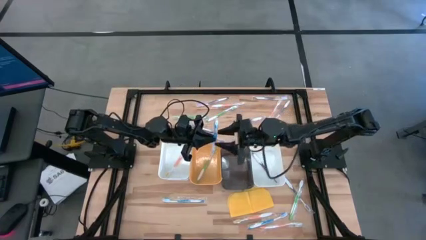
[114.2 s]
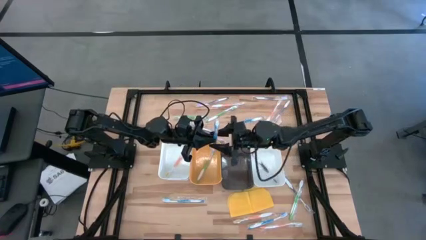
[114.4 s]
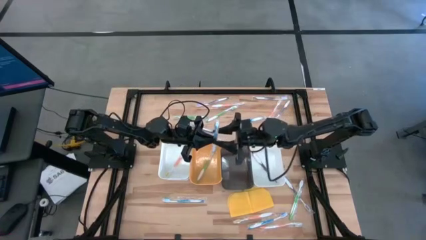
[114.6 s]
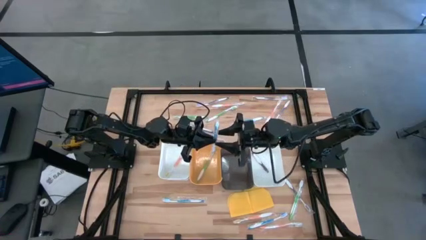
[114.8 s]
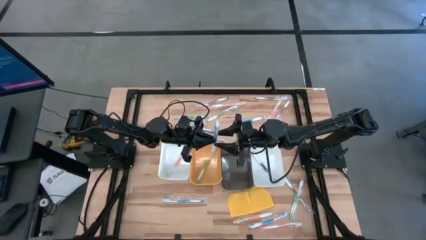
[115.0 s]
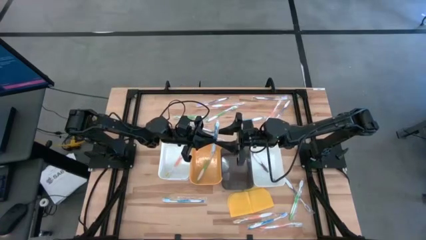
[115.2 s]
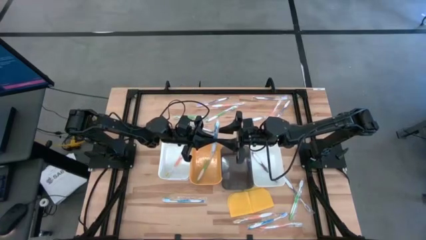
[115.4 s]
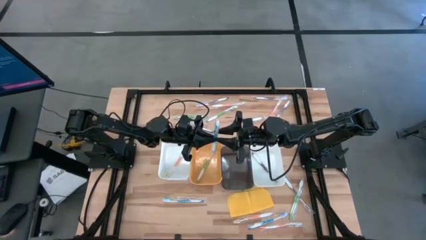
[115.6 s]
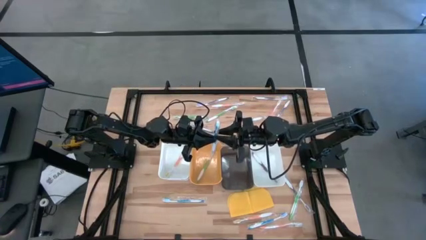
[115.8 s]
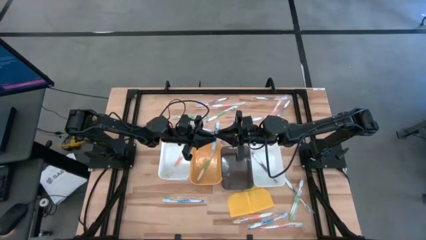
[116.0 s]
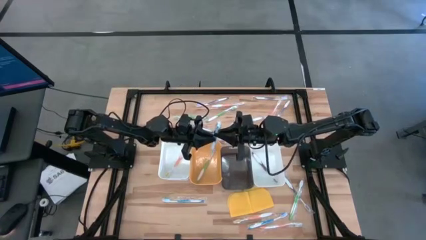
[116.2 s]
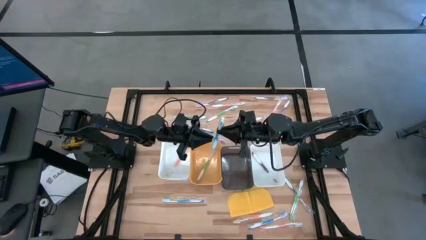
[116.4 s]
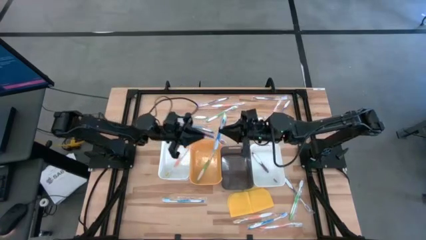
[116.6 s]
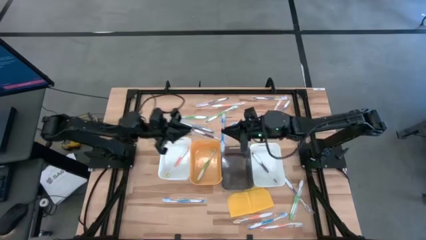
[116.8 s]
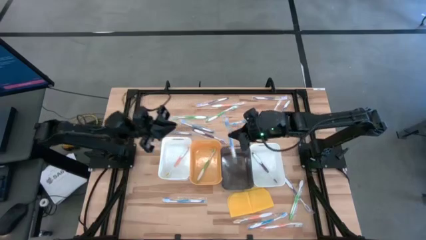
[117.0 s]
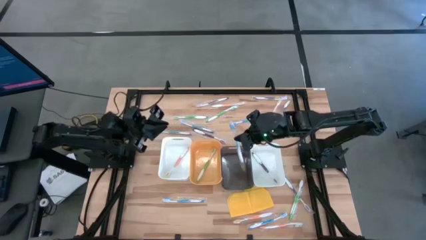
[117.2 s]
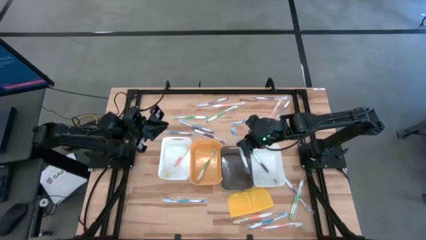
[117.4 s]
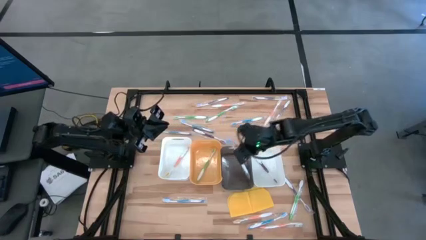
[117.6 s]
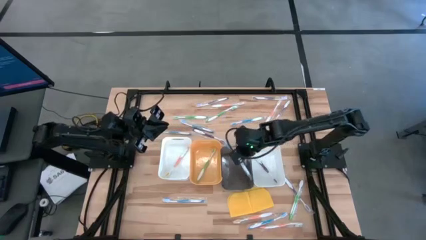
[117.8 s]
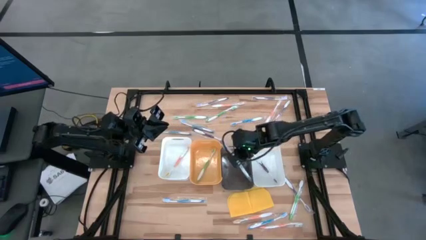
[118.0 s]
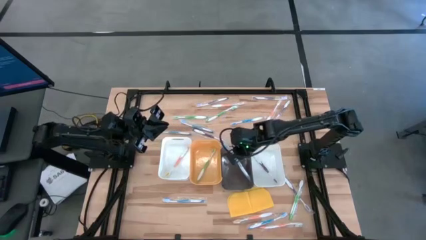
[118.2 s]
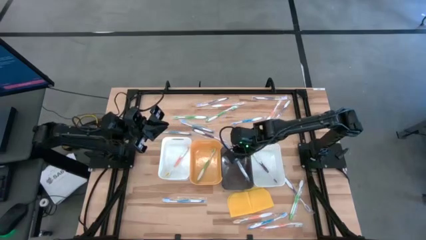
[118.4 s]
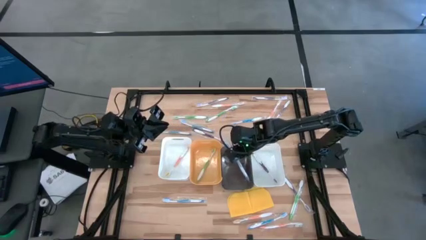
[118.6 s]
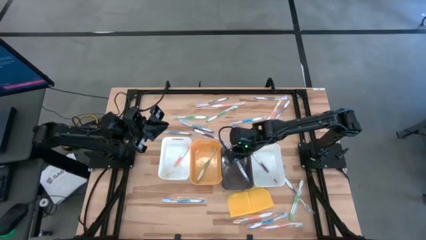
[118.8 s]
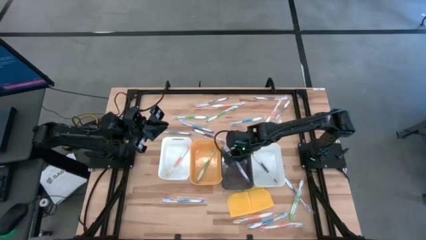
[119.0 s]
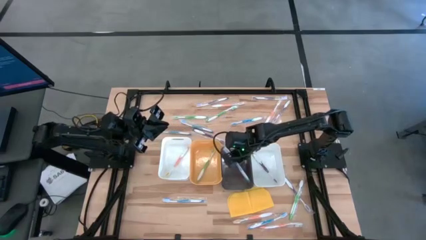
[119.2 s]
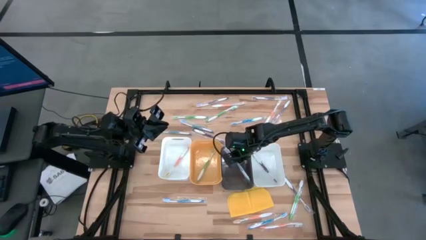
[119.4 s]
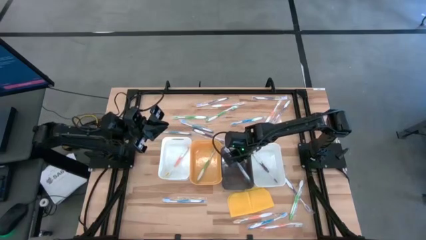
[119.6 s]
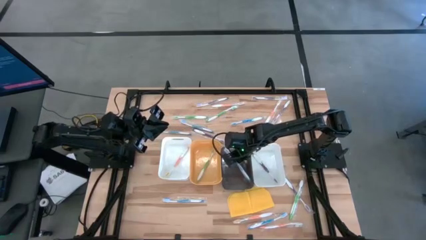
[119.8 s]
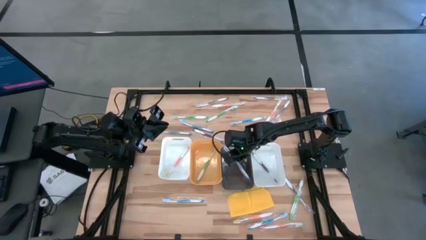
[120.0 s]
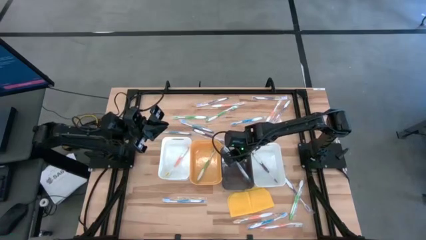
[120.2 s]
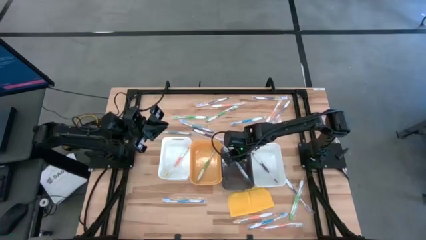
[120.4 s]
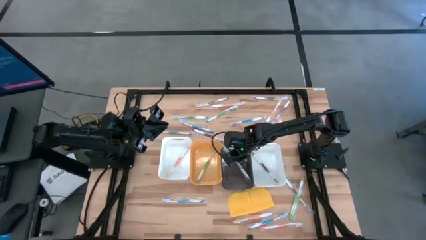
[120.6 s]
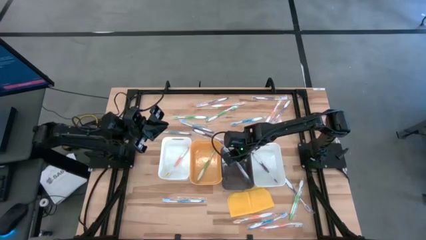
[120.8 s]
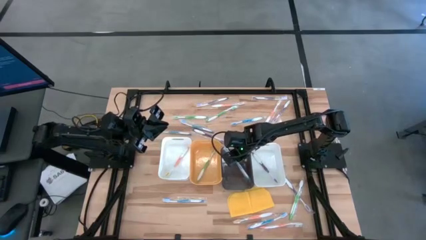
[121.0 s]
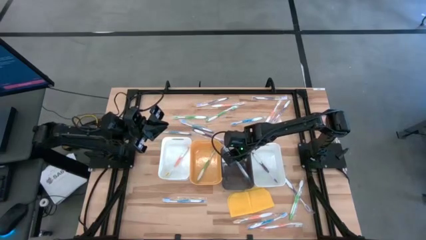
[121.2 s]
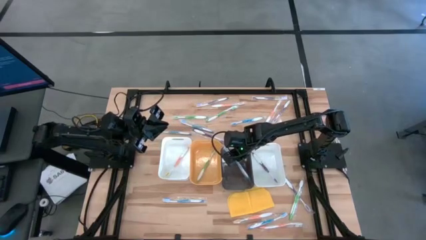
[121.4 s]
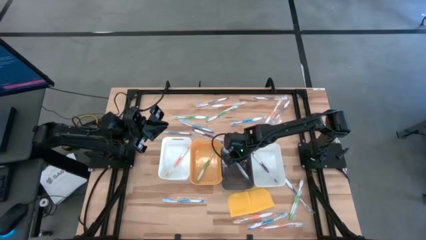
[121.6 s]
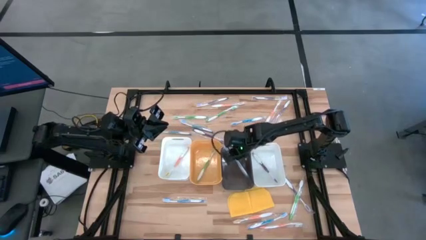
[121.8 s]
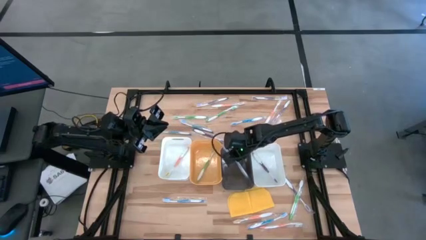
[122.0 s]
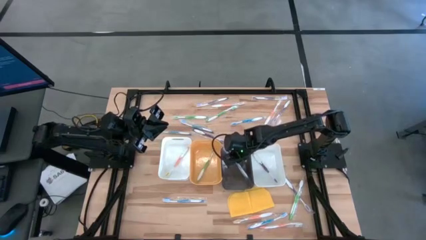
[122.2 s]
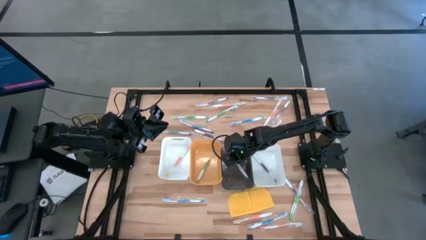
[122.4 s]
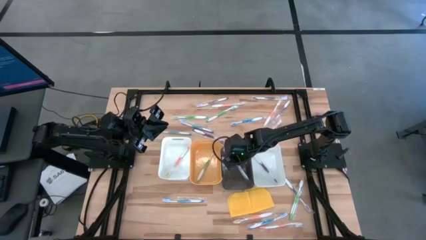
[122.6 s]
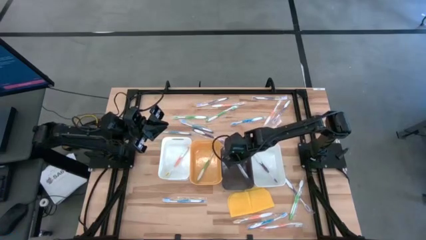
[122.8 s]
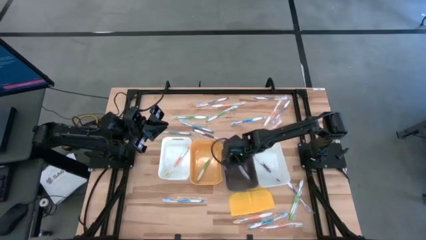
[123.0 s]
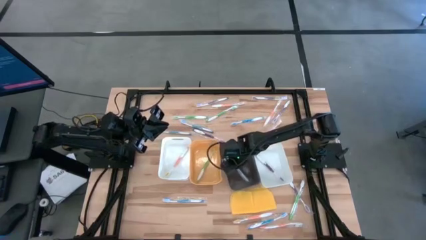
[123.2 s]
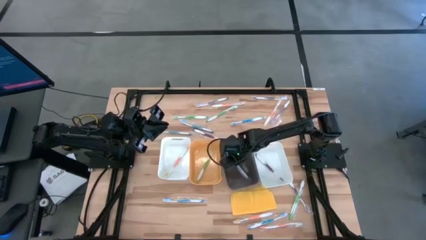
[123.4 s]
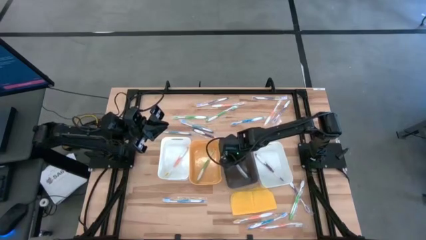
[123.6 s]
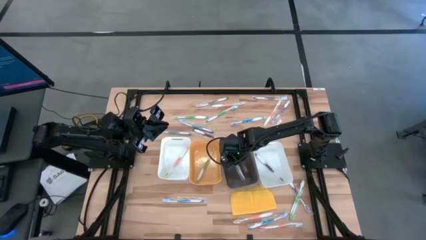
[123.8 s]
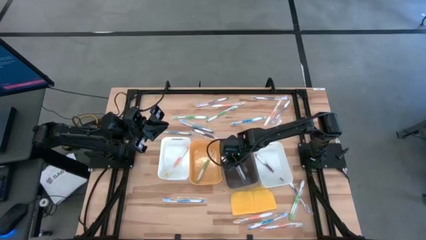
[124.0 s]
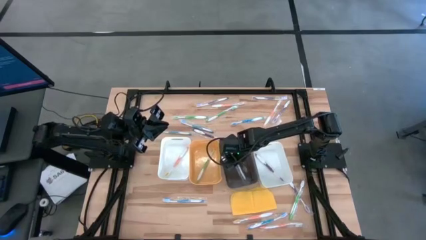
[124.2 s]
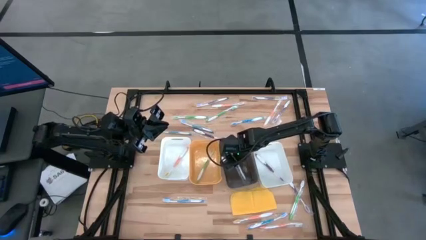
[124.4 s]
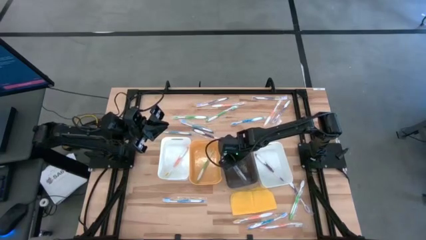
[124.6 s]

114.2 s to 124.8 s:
Task: Pick & Place Toothbrushes
Put the blue toothbrush into the black bin

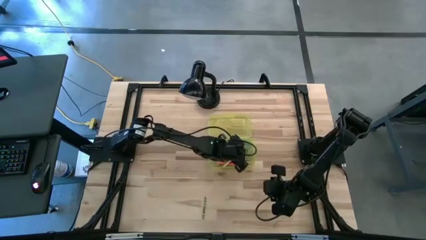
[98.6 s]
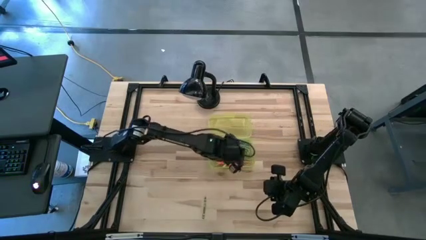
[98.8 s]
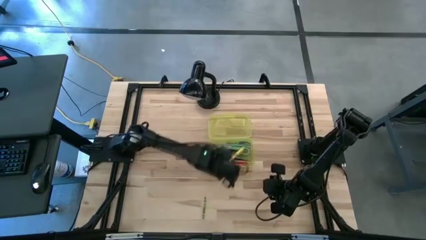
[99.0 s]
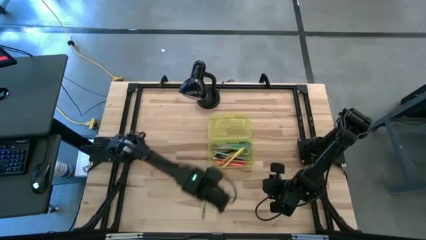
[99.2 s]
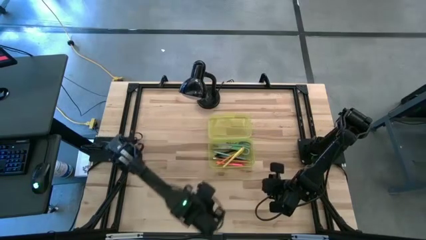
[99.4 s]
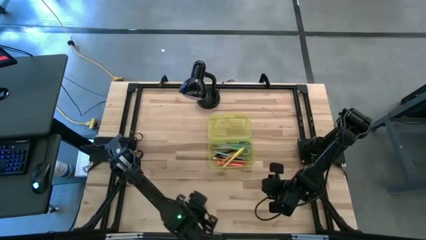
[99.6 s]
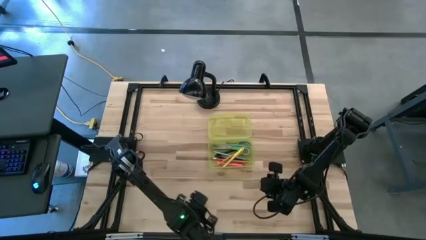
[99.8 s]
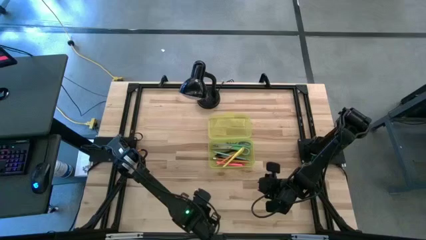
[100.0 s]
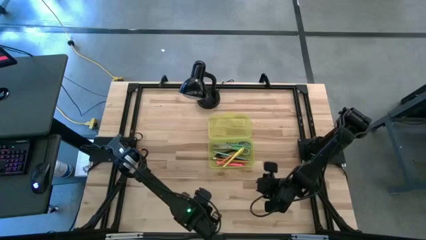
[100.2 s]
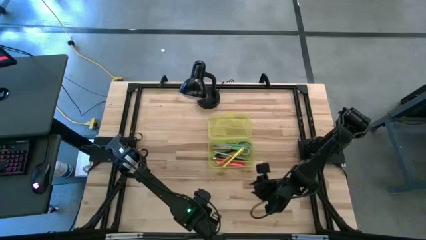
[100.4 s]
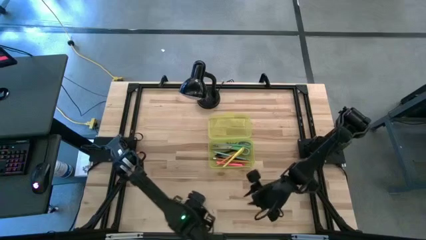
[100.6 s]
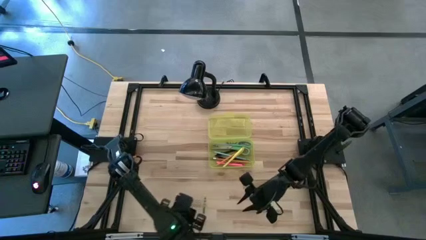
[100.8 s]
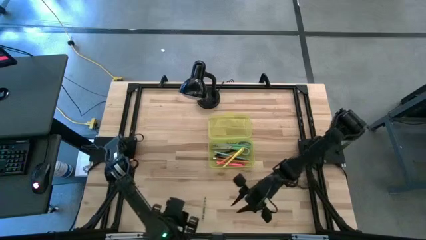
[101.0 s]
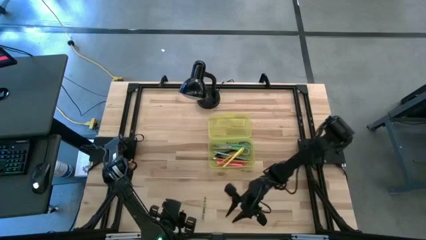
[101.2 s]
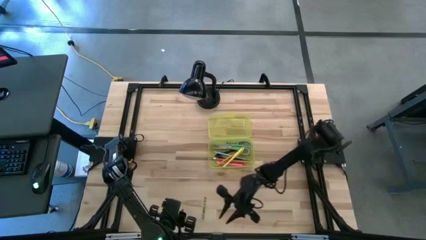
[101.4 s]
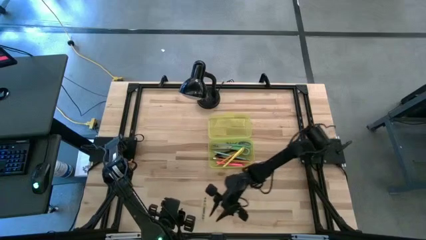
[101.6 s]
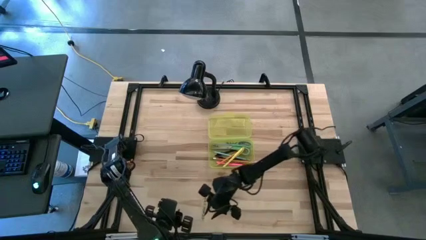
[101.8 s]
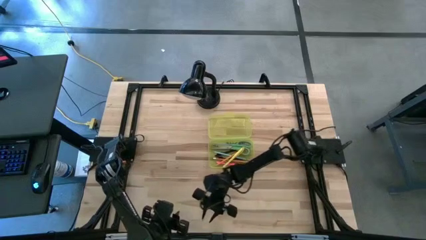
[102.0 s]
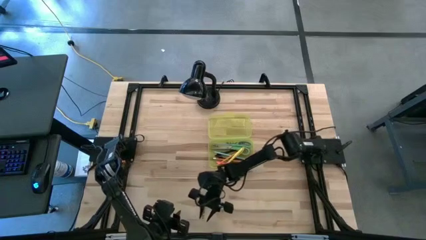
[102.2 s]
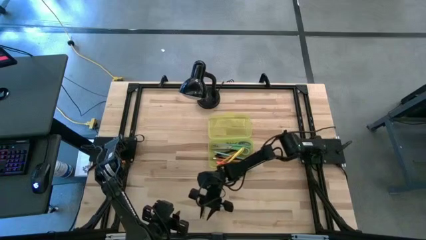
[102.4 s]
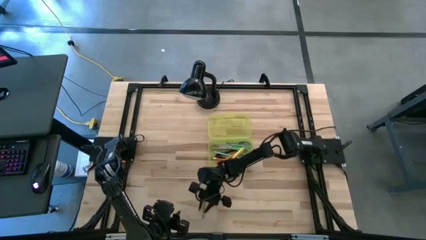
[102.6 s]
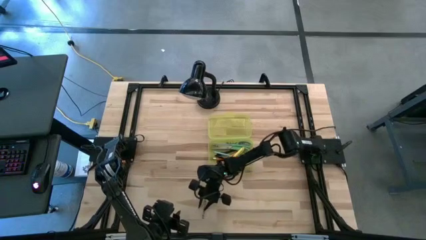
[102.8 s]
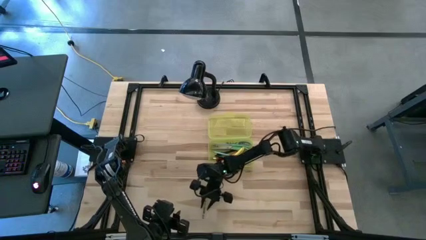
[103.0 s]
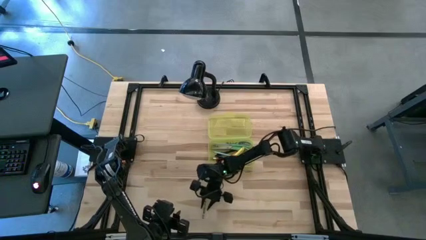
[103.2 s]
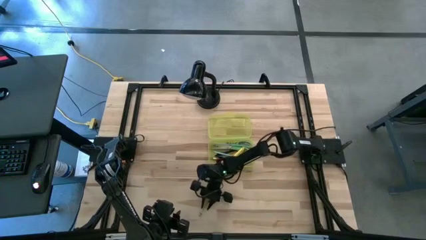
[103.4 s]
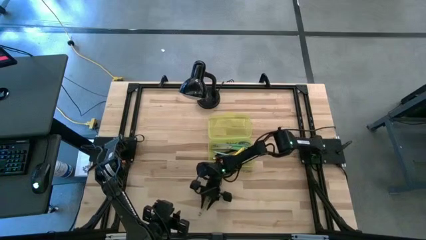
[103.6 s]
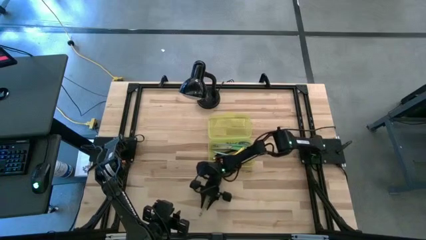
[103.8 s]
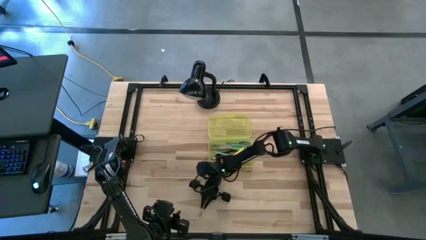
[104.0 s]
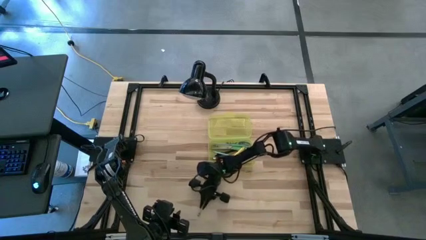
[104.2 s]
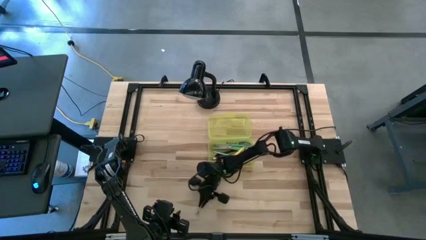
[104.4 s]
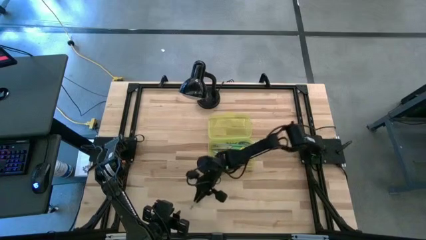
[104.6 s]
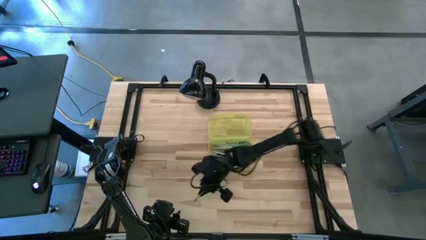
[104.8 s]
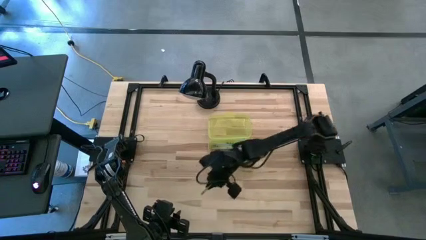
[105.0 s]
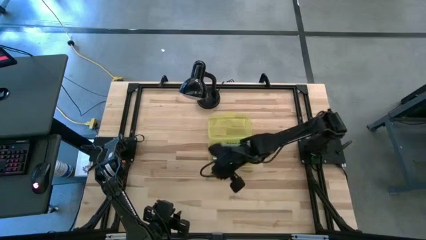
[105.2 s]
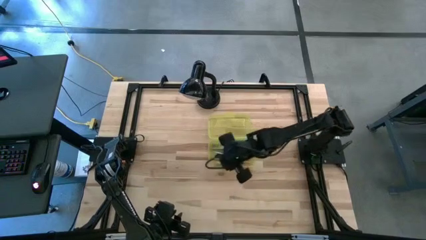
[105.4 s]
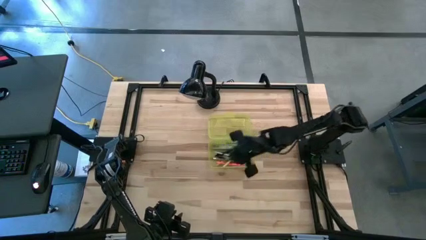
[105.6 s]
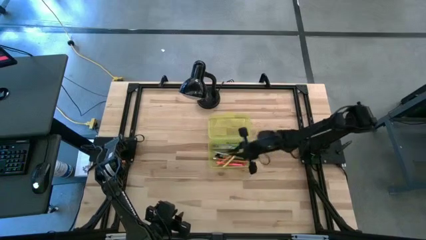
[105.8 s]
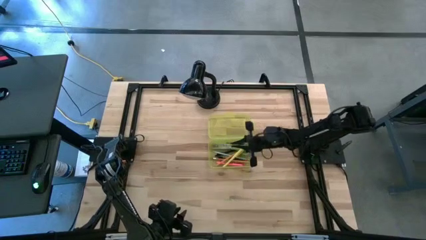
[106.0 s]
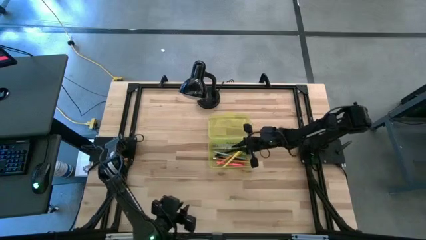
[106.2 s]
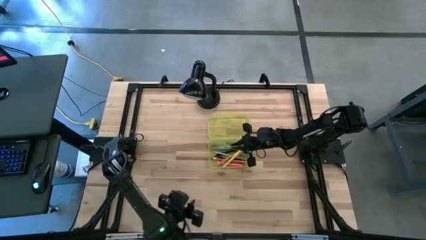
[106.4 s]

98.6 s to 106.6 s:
Task: Pick & place school supplies into a supply box
Put the green crayon into the yellow supply box
